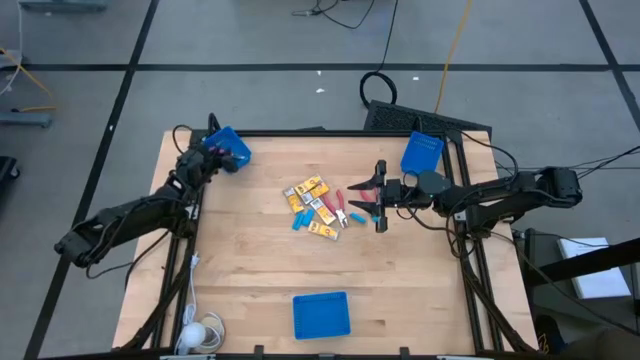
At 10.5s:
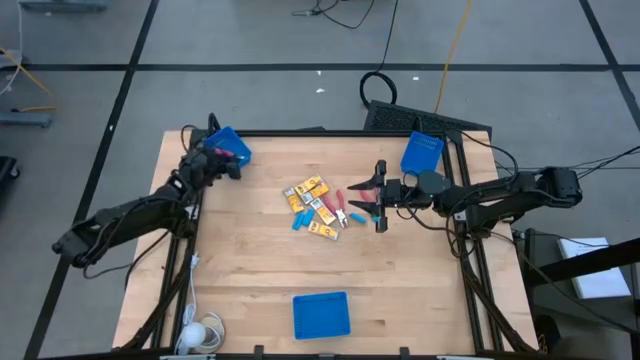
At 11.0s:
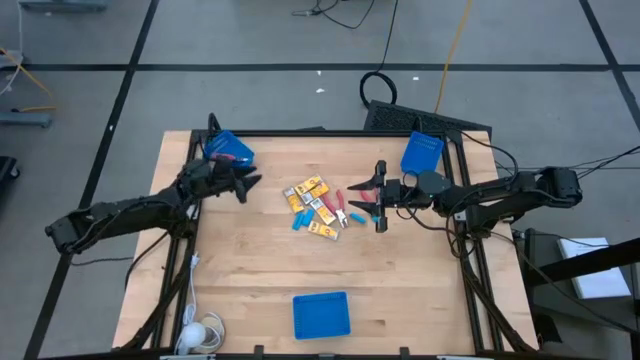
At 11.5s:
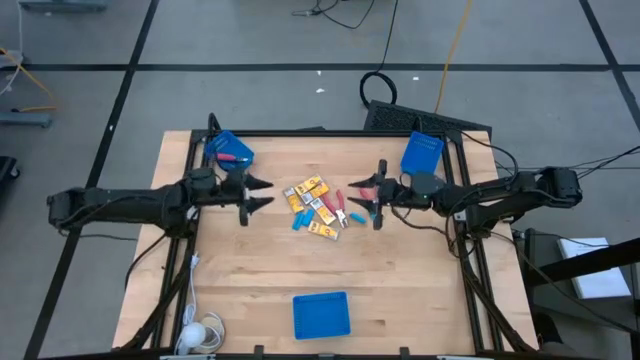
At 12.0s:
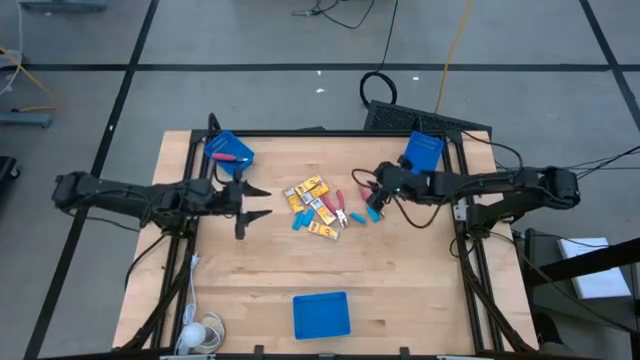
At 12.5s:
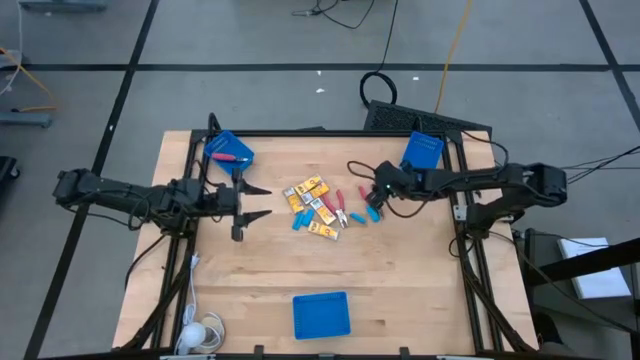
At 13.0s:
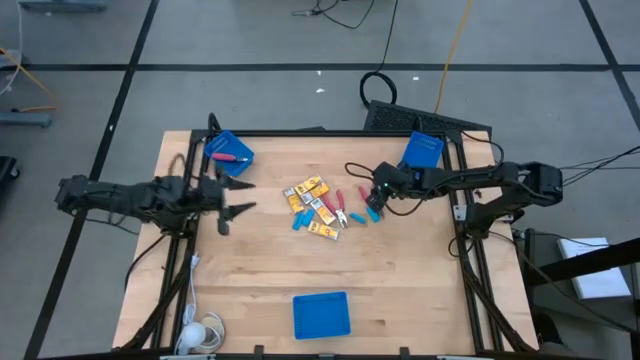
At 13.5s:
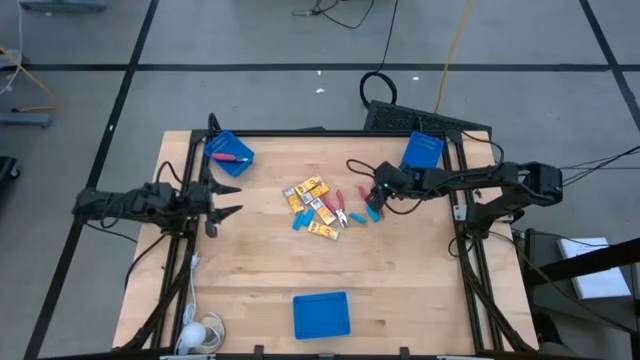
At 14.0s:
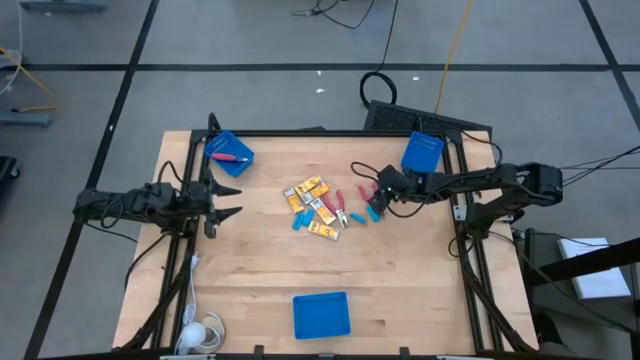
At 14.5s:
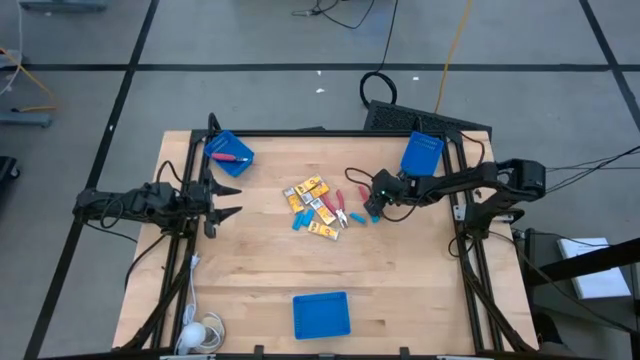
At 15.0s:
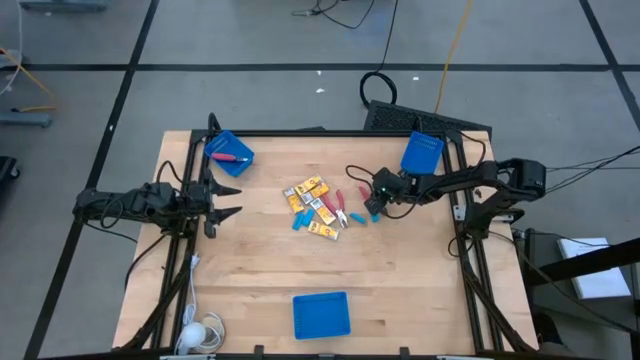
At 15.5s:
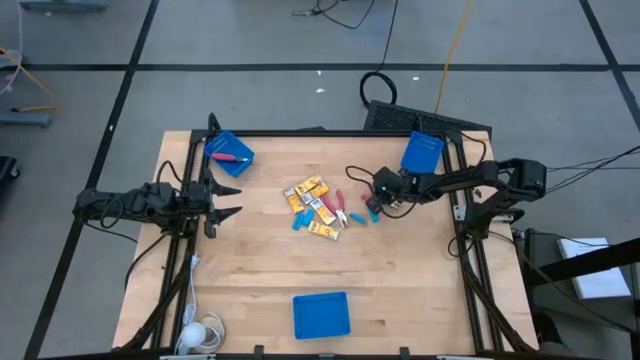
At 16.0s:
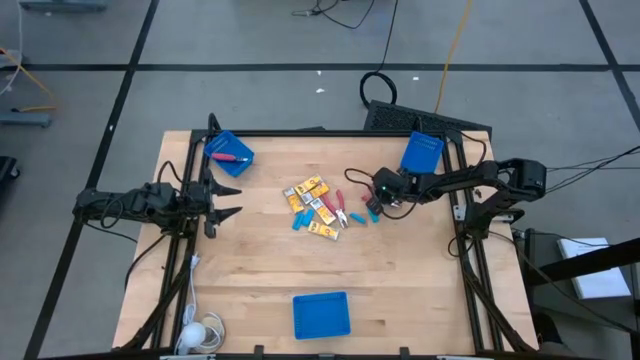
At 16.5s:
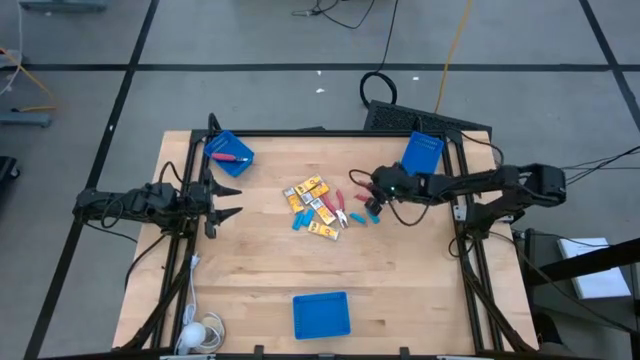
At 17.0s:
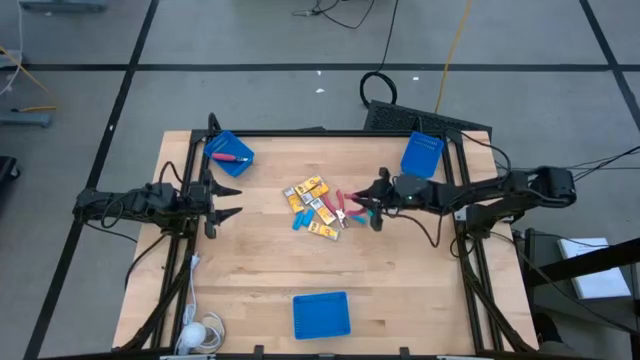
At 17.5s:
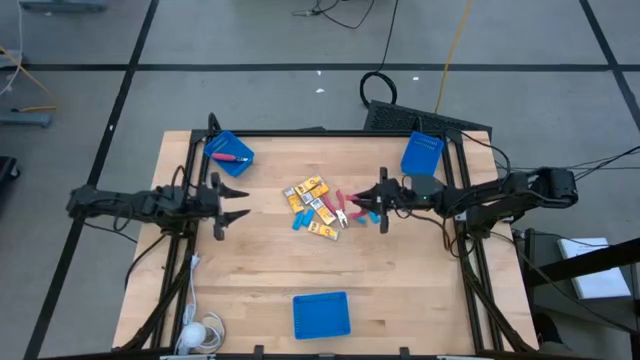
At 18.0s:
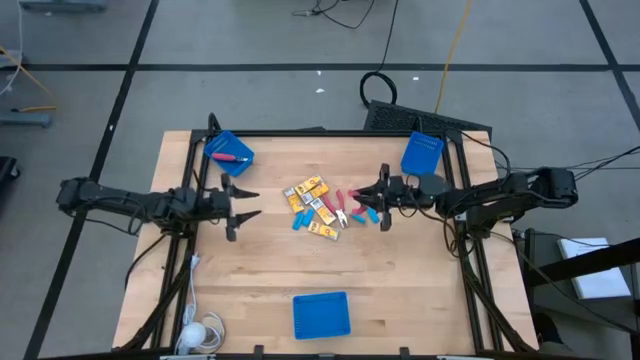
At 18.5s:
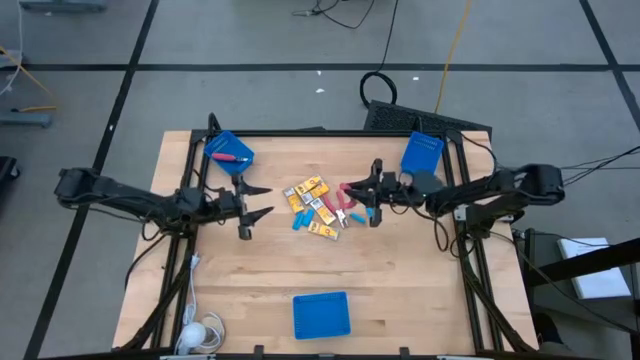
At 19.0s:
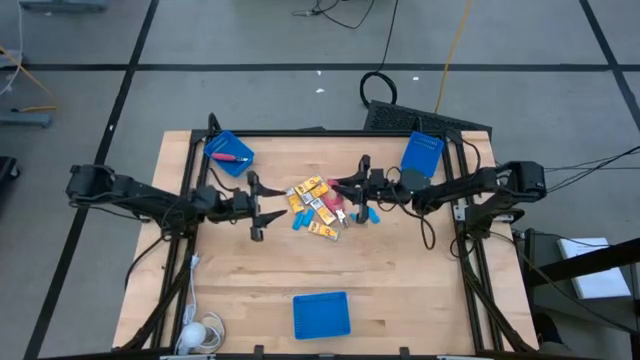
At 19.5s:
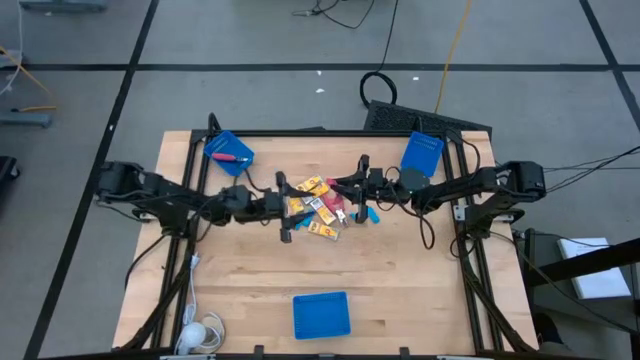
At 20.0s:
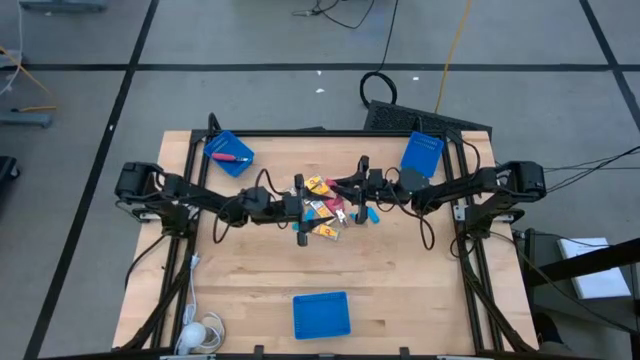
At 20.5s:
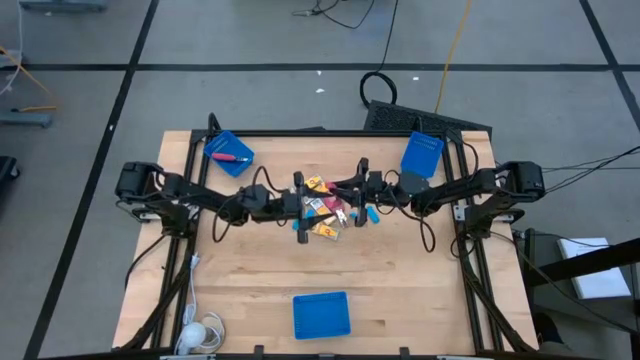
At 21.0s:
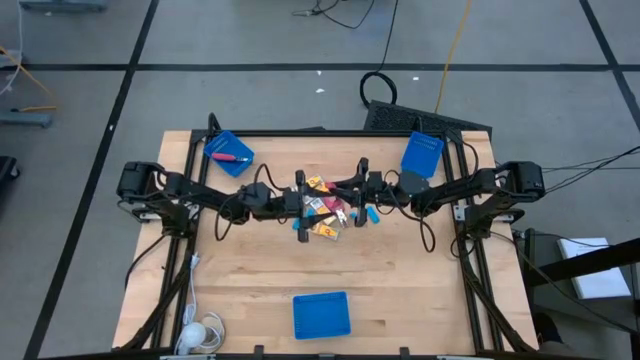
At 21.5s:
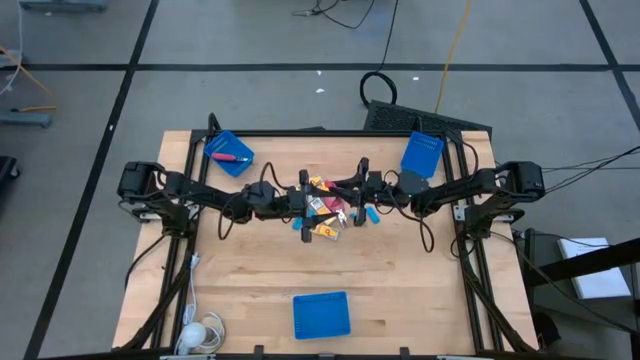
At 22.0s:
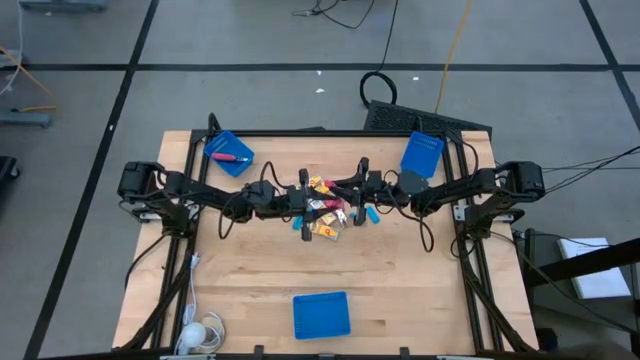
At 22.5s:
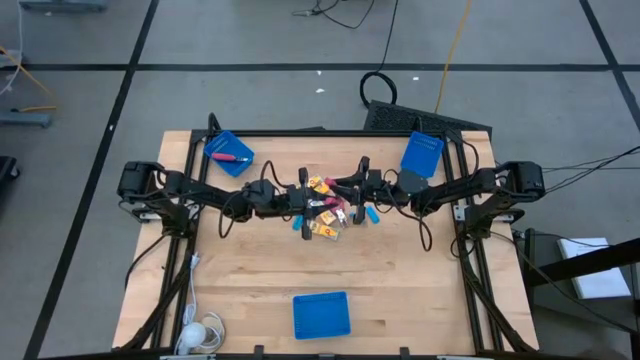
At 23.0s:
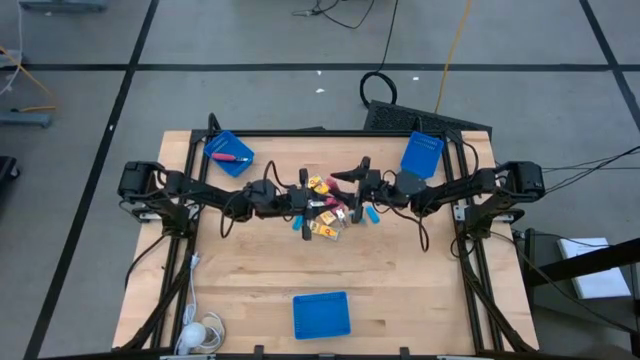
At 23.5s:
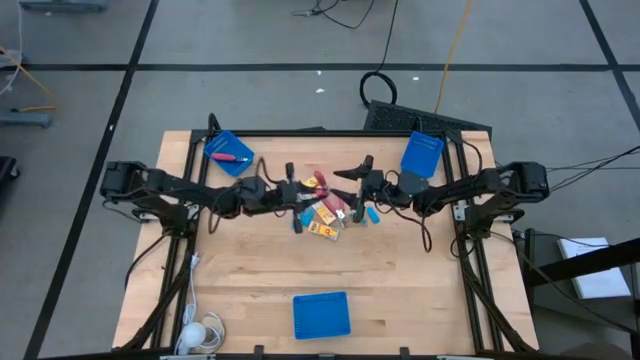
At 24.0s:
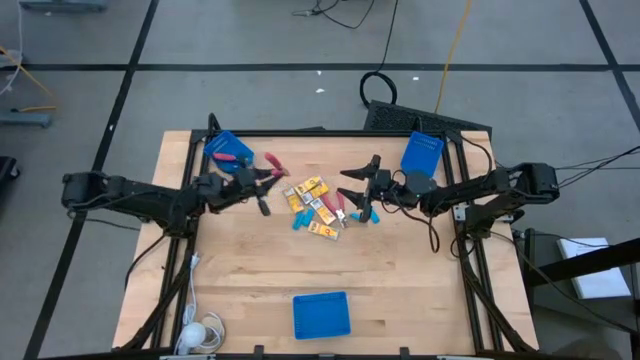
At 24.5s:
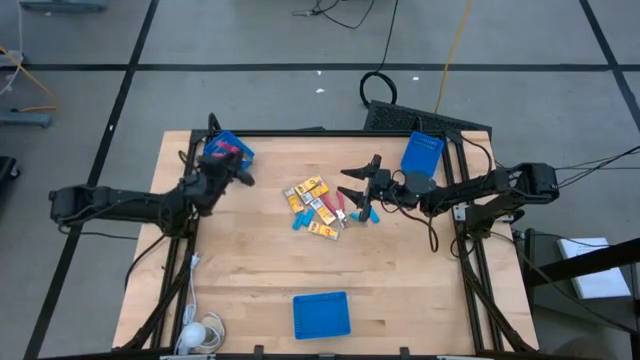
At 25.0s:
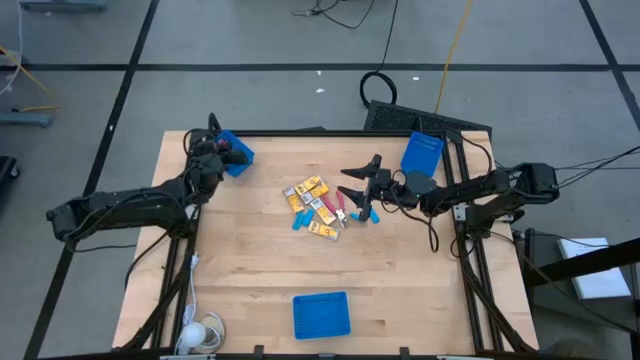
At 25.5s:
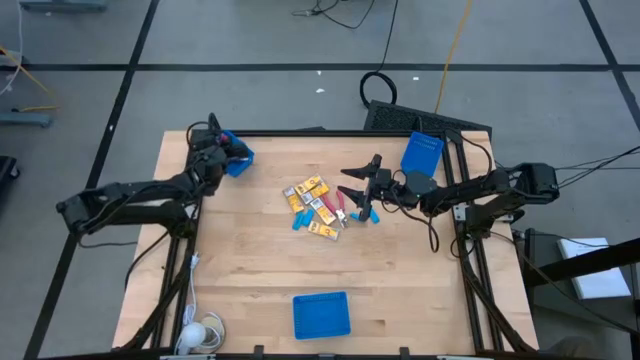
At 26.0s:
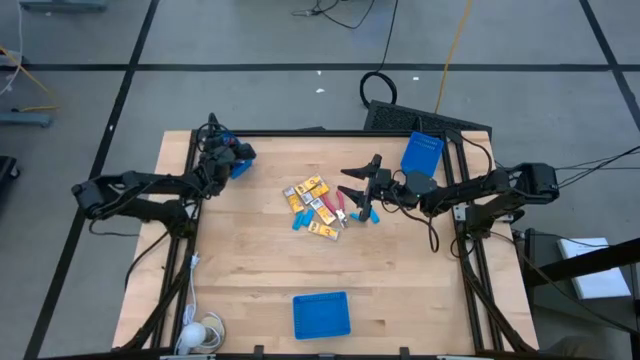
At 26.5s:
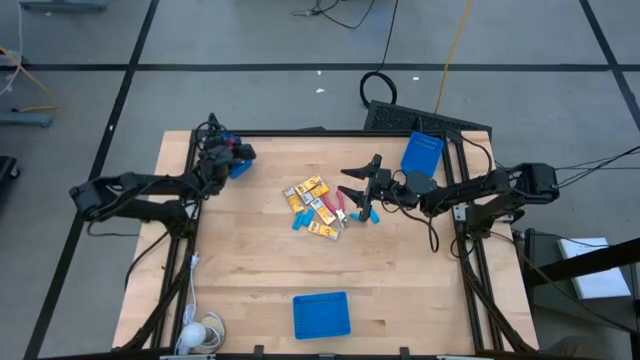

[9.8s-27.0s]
Task: Pick & Place School Supplies
Put the pink ticket punch into the left blue bin
